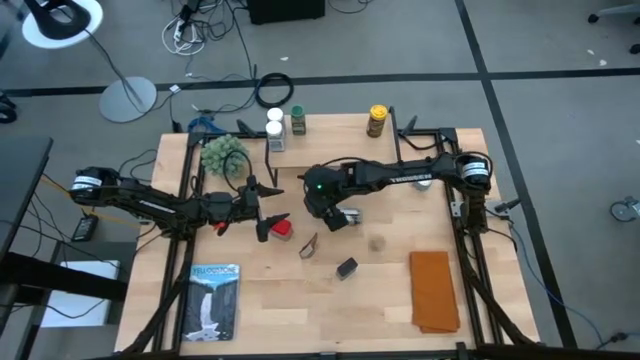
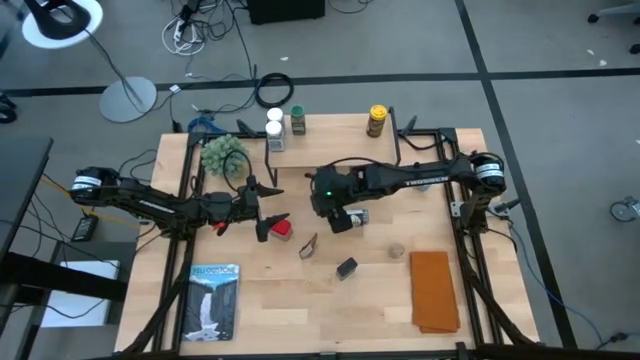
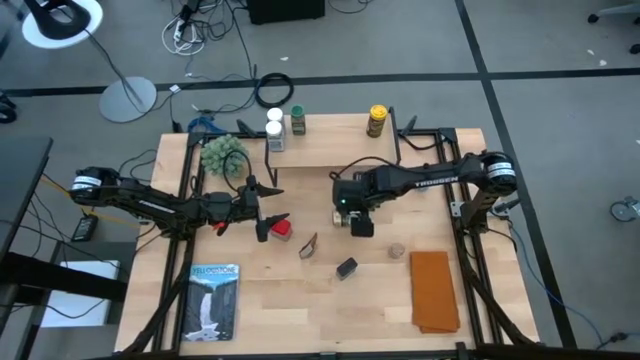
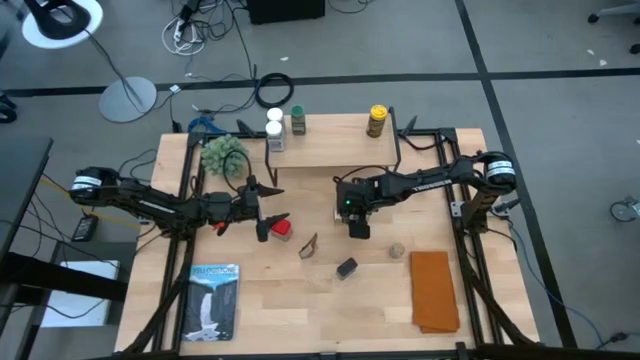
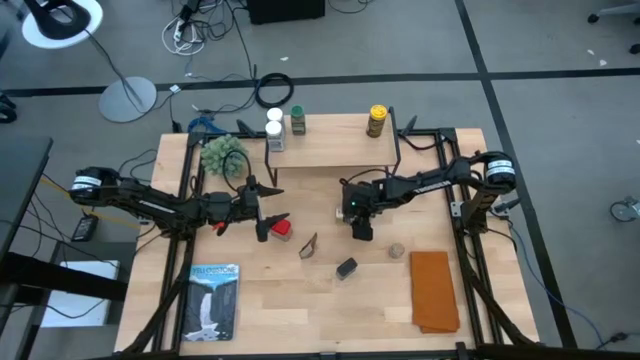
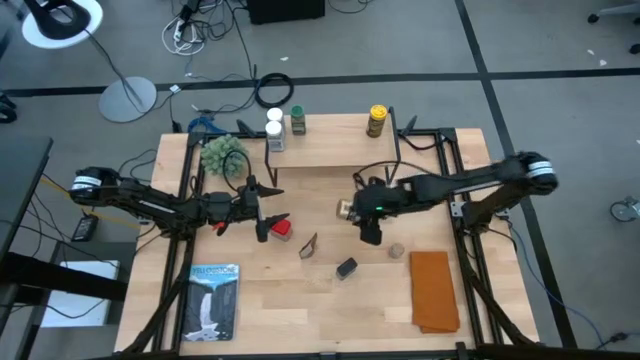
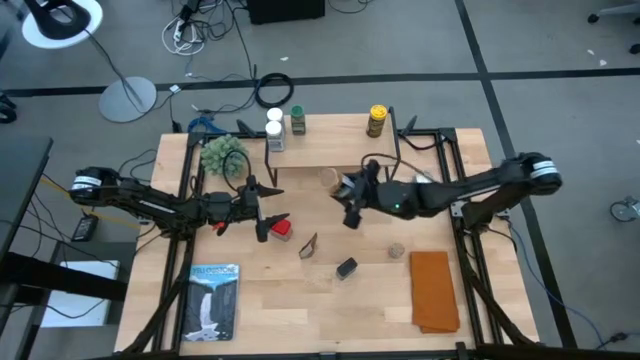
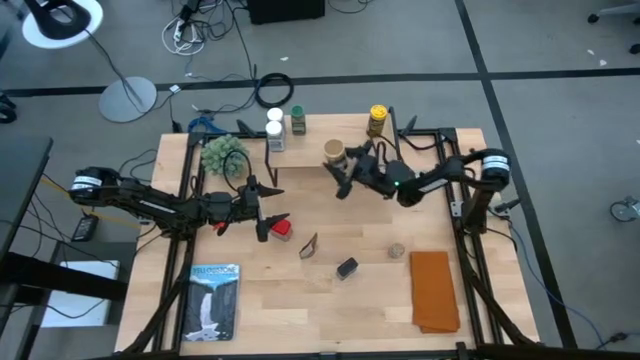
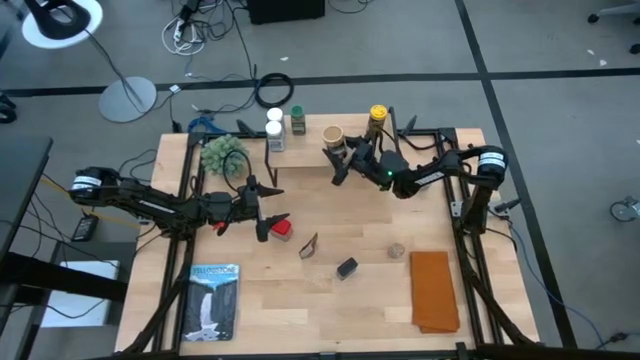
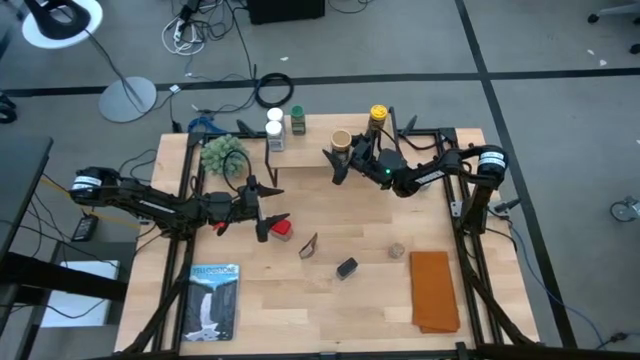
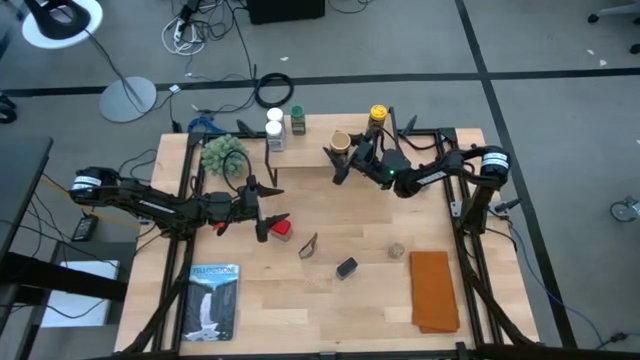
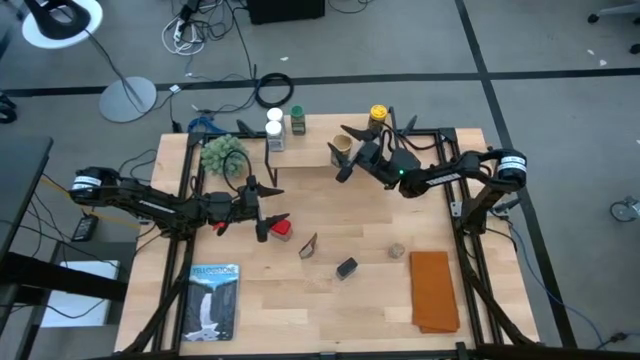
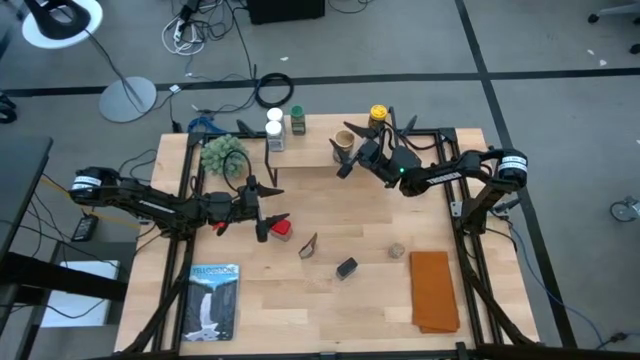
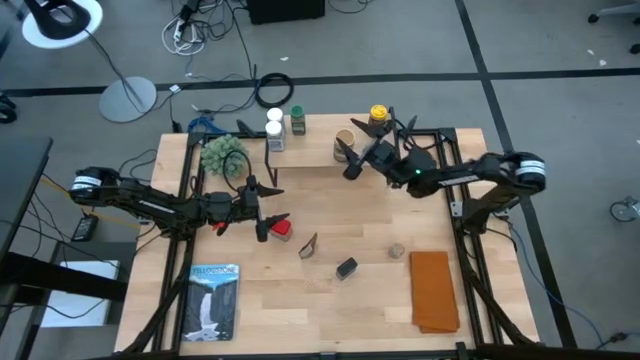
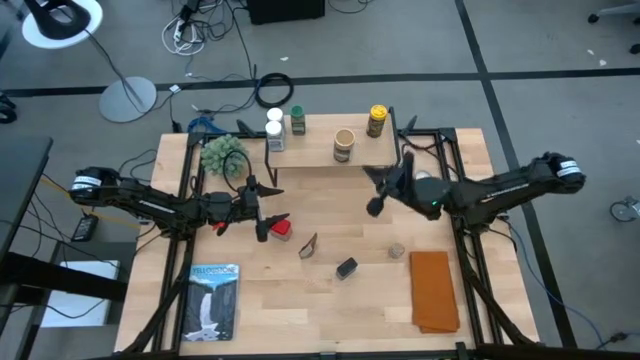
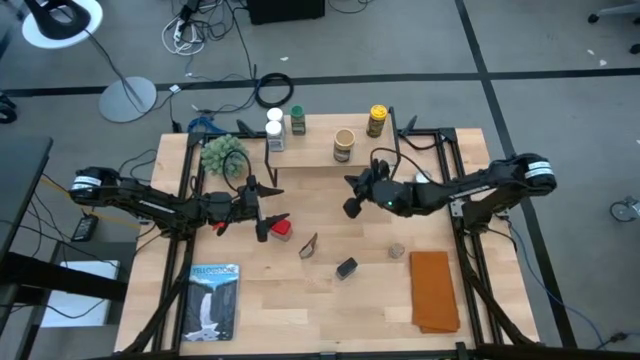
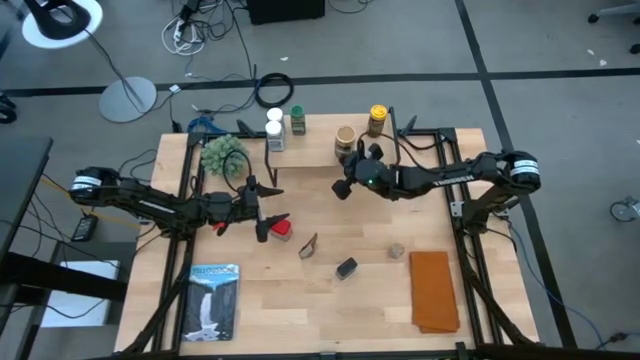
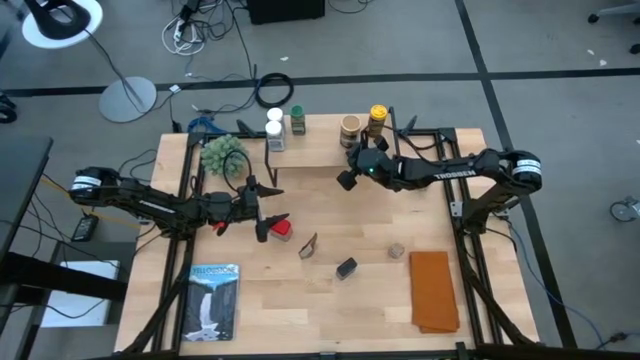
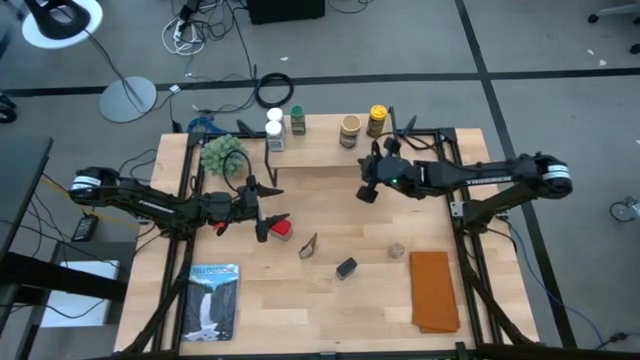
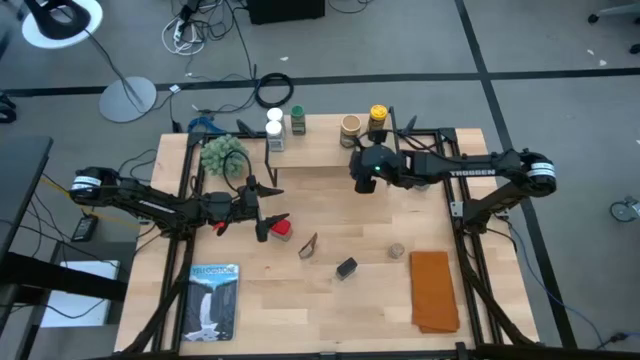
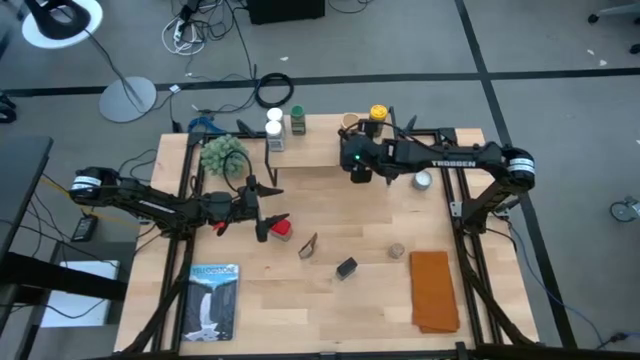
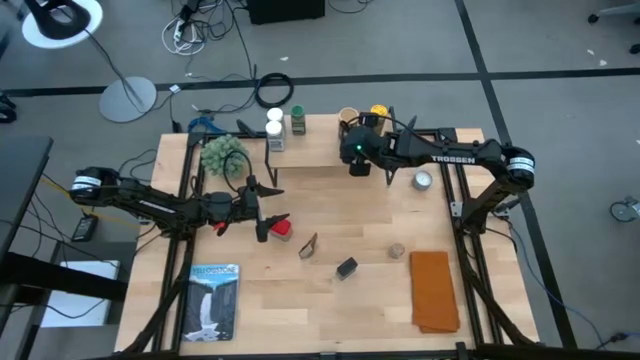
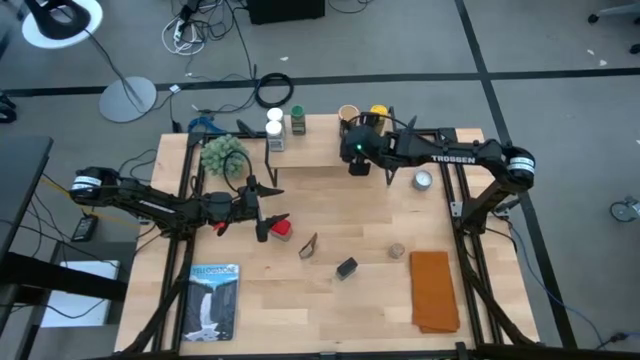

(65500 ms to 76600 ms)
Task: Shelf spices
Put the gold seasoning bottle on the shelf

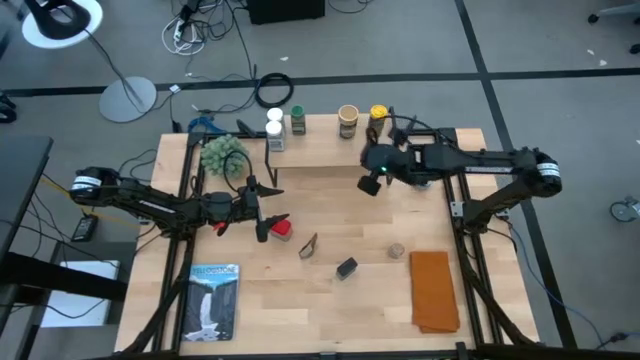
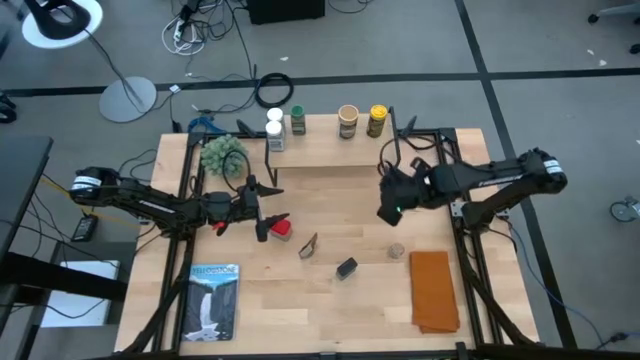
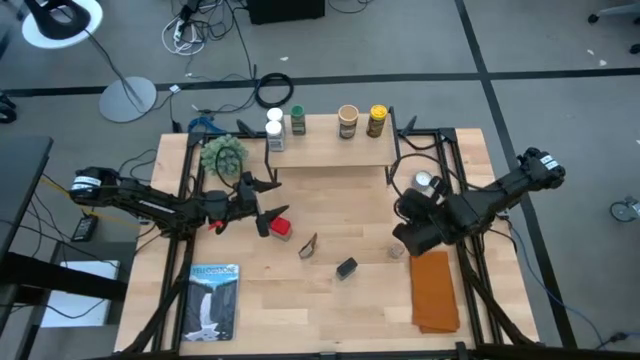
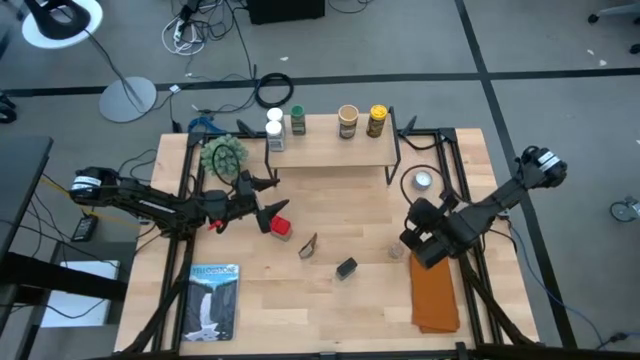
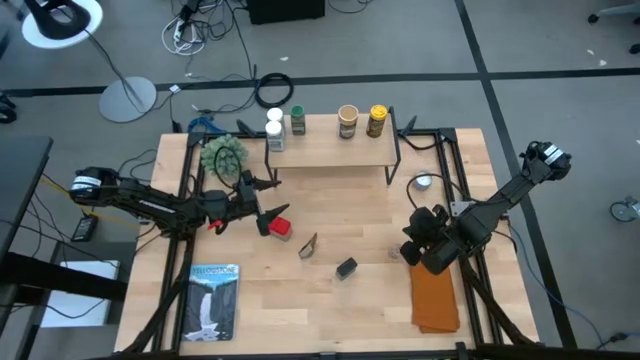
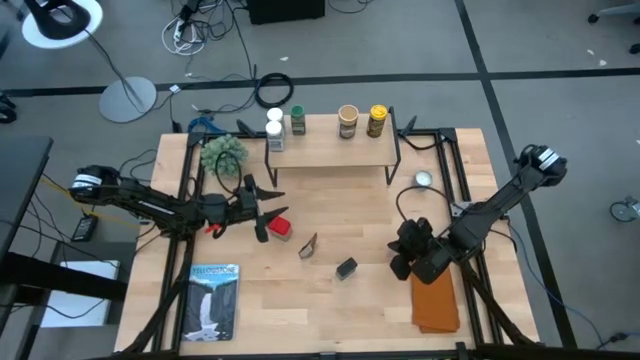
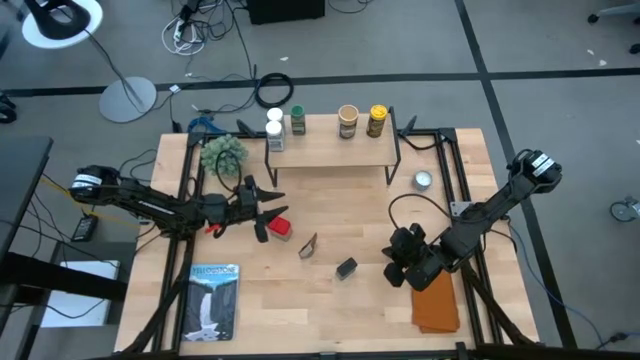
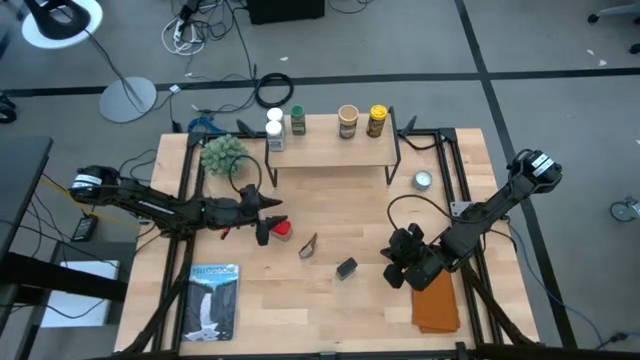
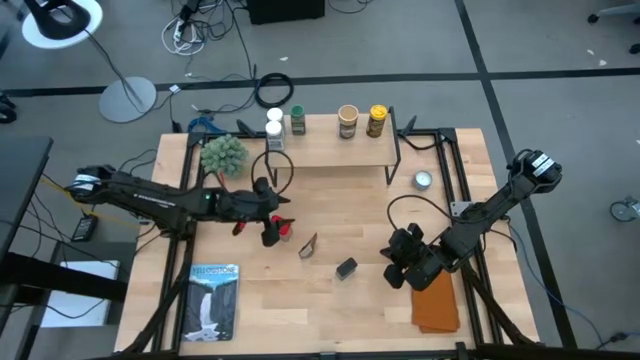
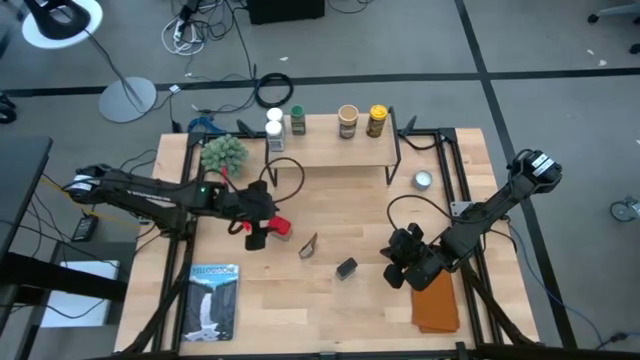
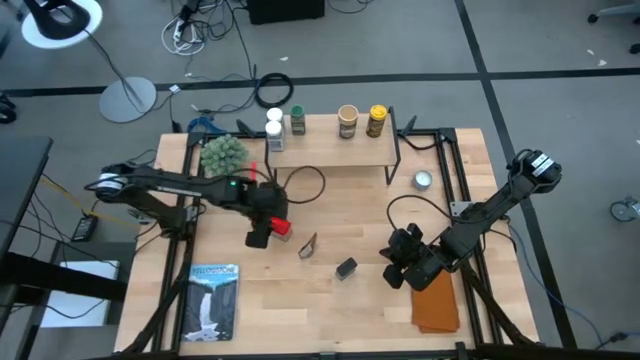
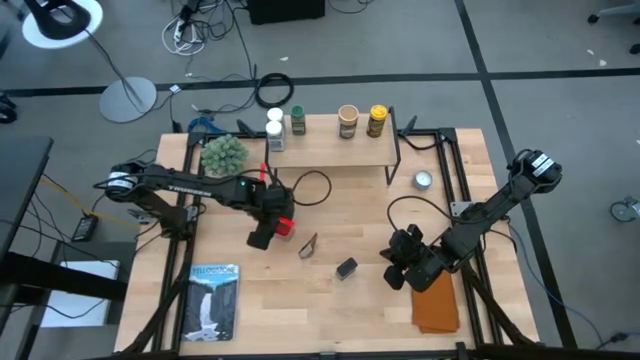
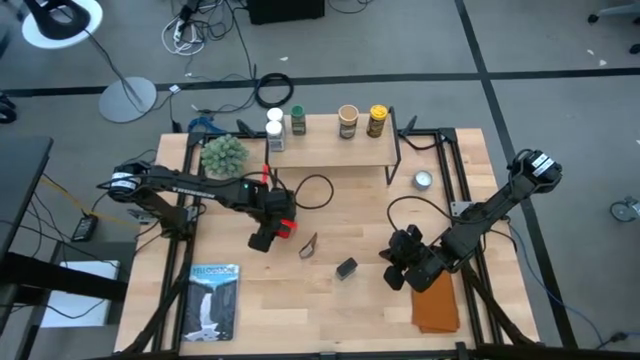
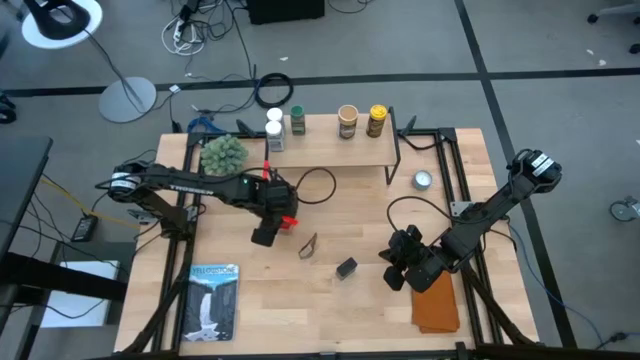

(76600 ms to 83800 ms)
Put the red seasoning can on the shelf

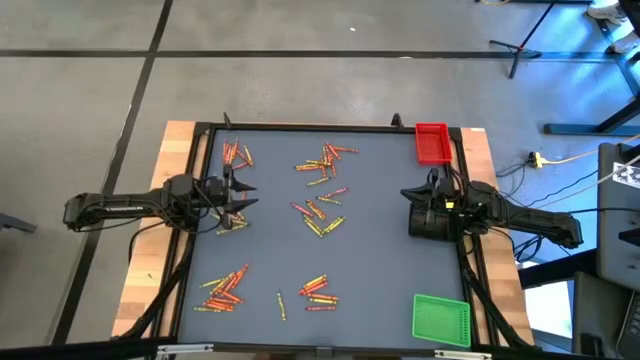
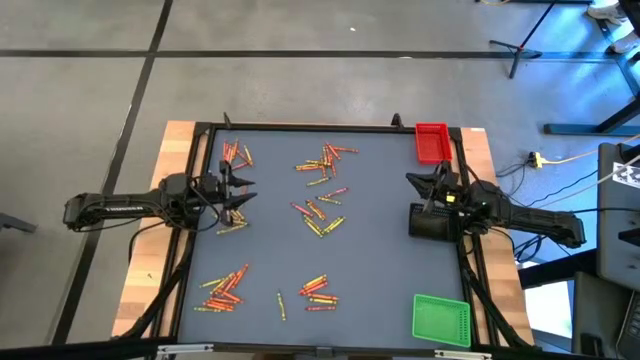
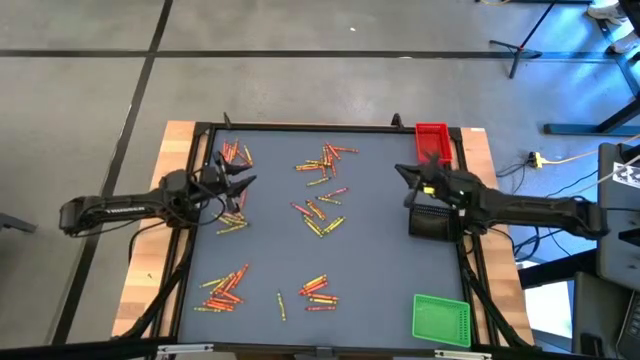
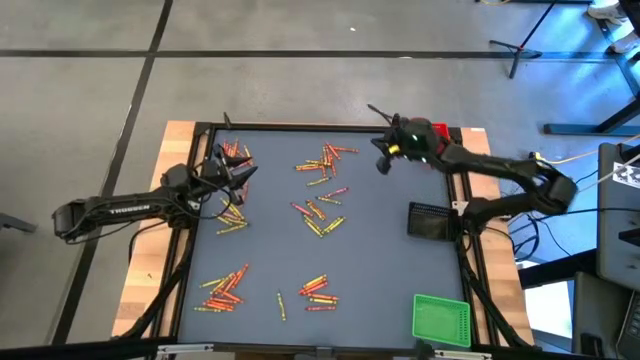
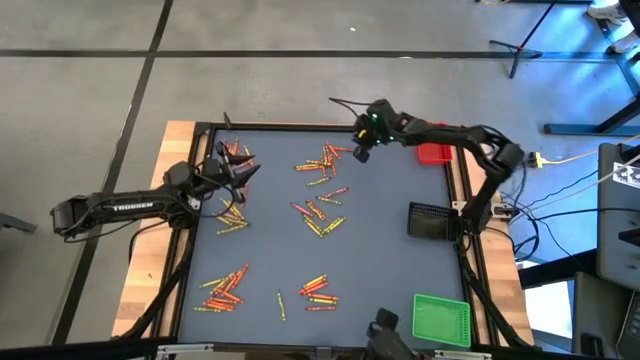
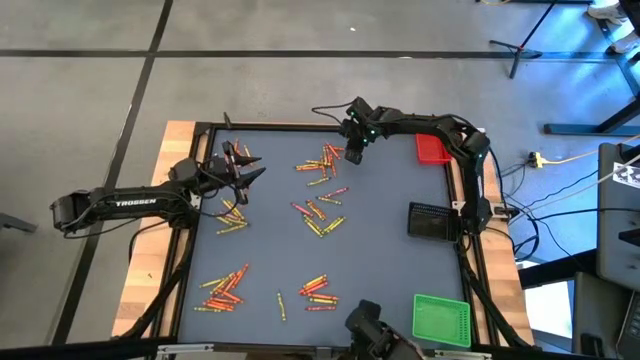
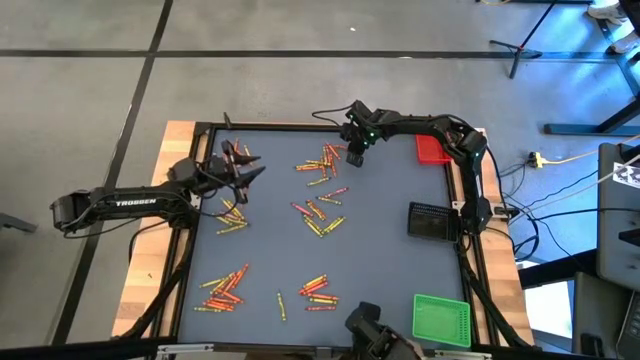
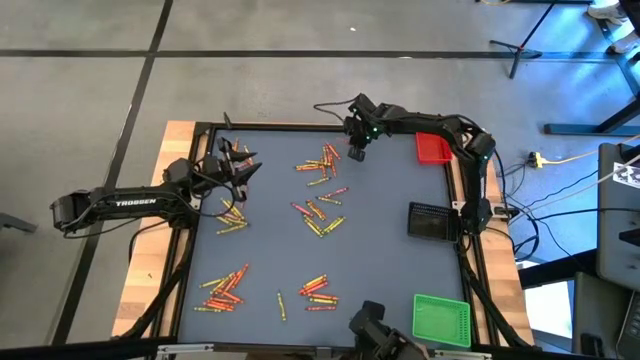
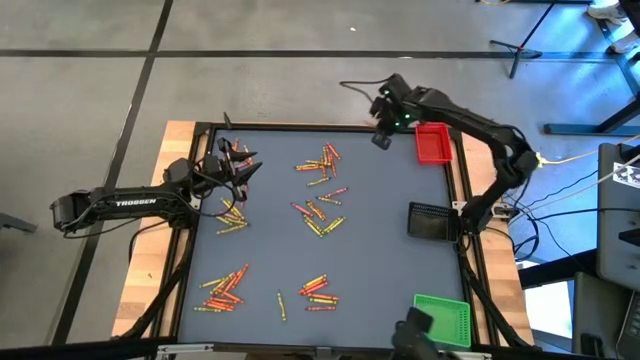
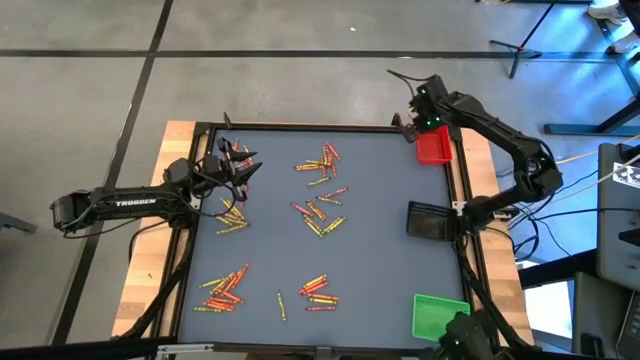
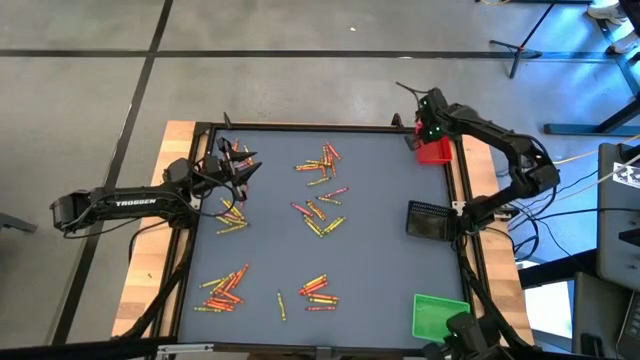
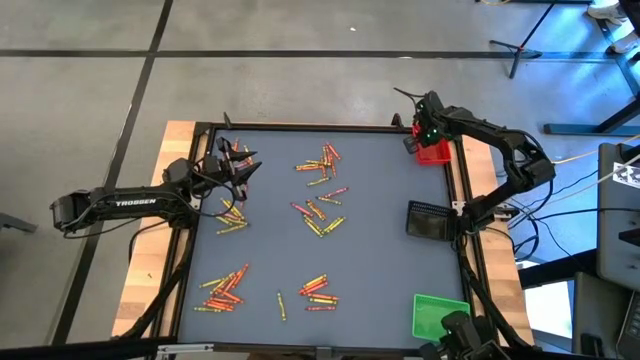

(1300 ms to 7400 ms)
Task: Sort crayons
Put the orange crayon into the red basket
